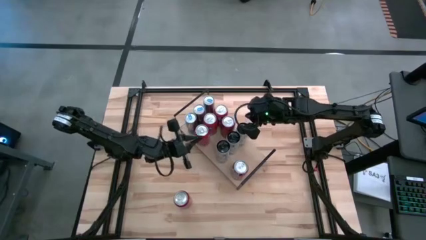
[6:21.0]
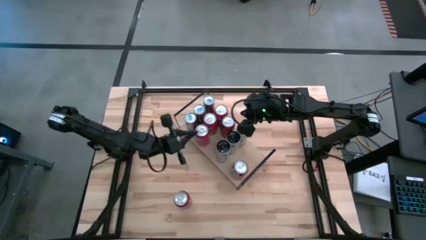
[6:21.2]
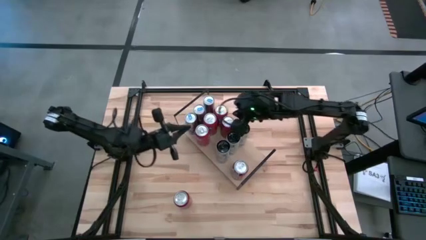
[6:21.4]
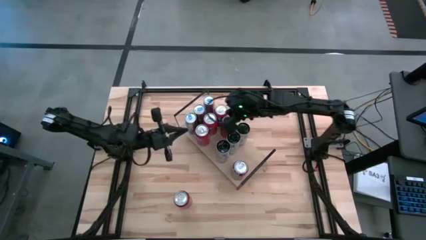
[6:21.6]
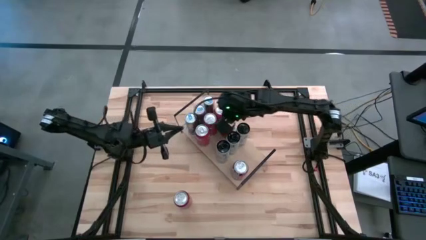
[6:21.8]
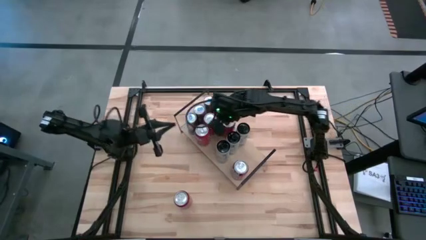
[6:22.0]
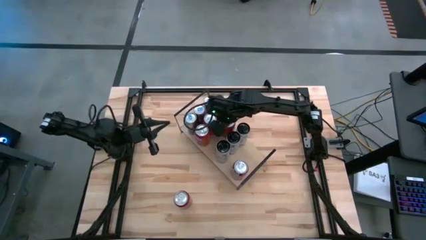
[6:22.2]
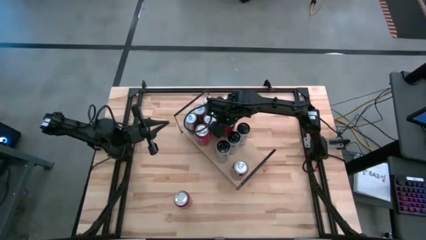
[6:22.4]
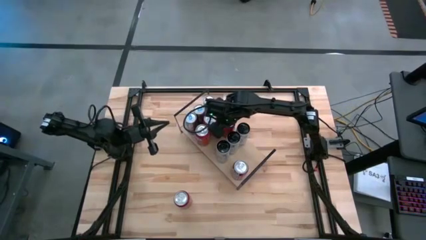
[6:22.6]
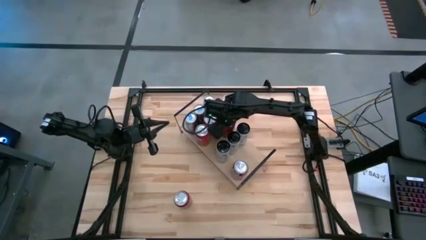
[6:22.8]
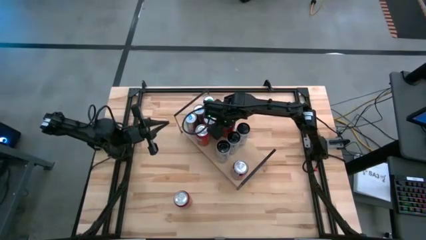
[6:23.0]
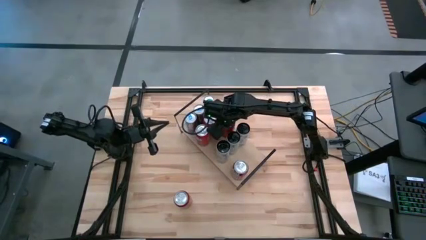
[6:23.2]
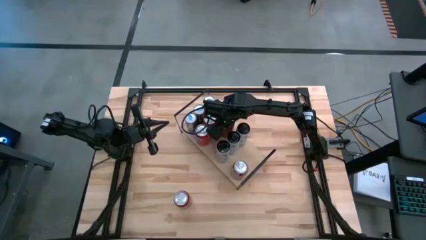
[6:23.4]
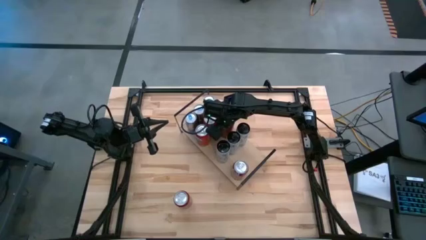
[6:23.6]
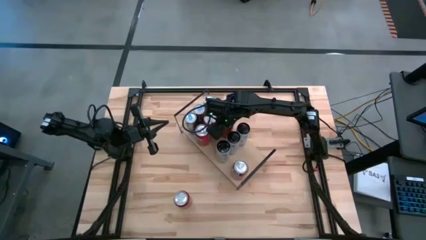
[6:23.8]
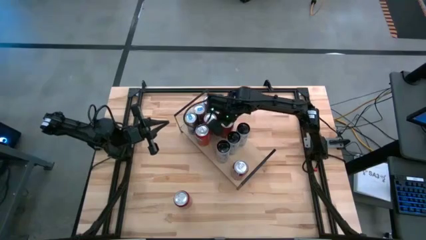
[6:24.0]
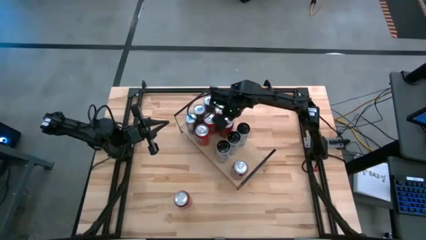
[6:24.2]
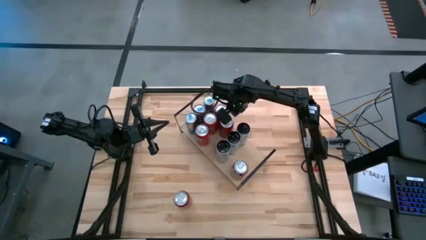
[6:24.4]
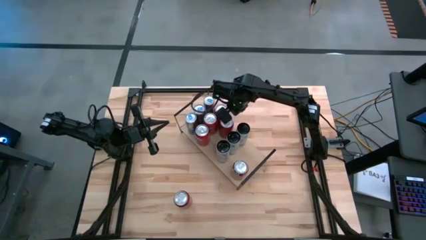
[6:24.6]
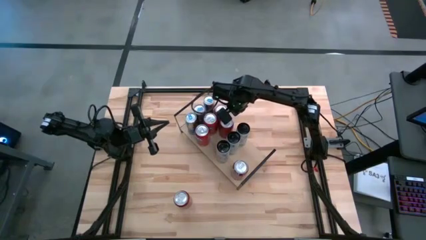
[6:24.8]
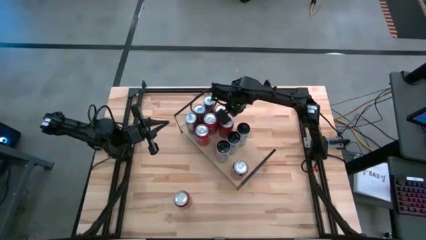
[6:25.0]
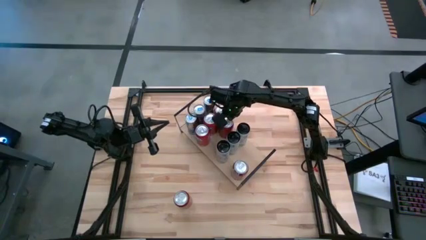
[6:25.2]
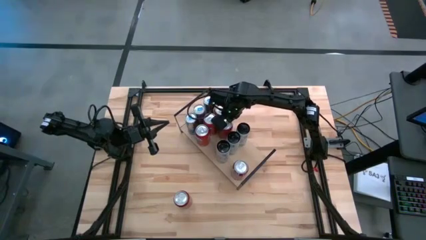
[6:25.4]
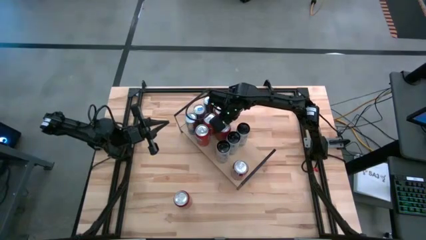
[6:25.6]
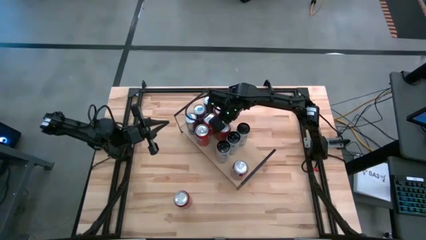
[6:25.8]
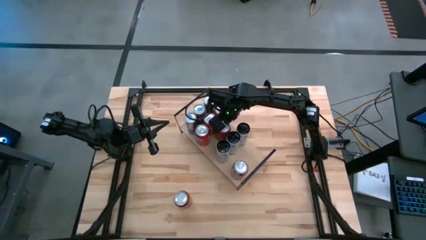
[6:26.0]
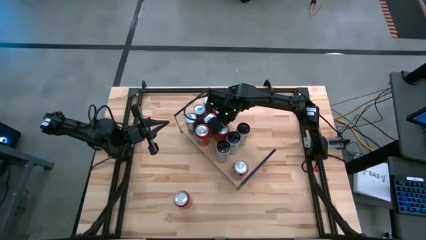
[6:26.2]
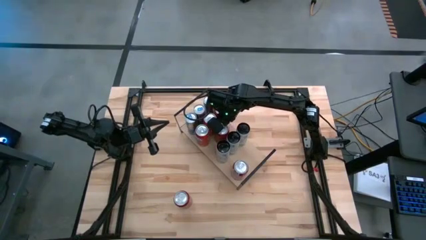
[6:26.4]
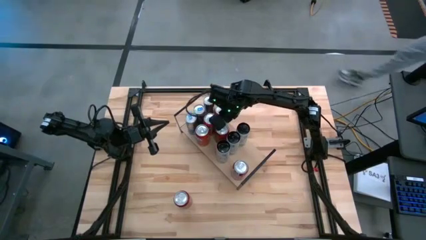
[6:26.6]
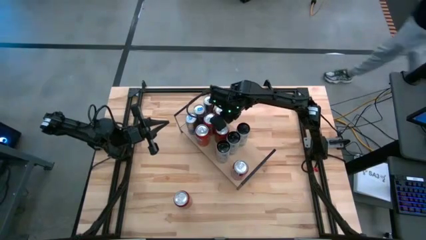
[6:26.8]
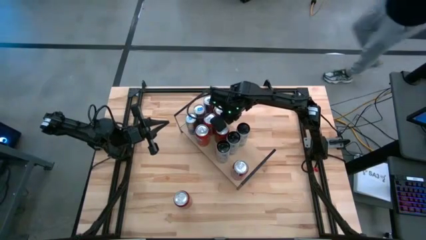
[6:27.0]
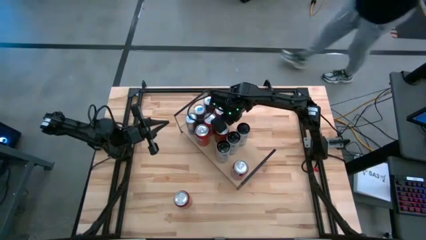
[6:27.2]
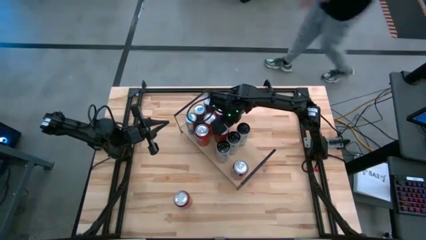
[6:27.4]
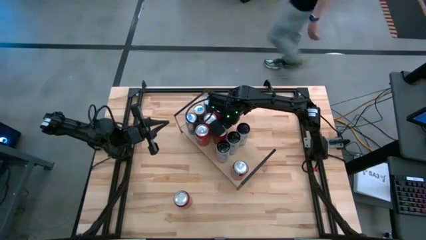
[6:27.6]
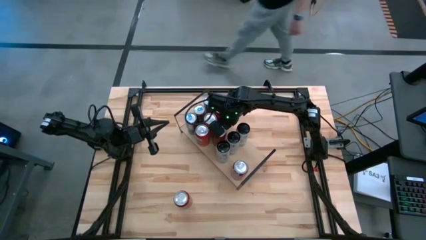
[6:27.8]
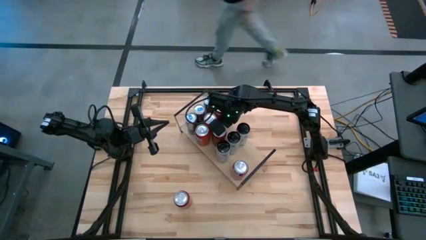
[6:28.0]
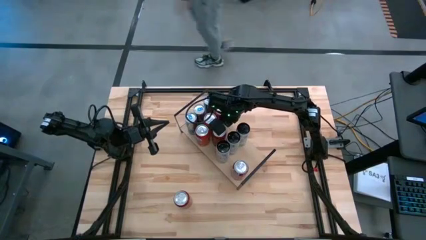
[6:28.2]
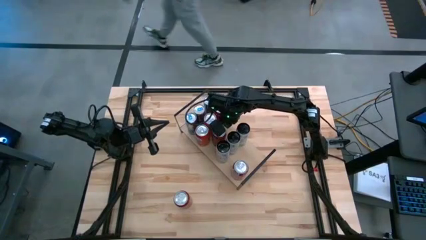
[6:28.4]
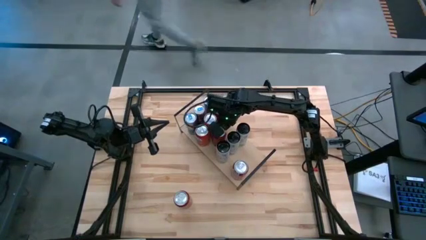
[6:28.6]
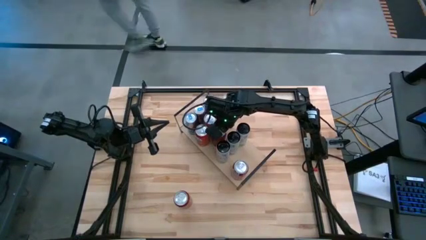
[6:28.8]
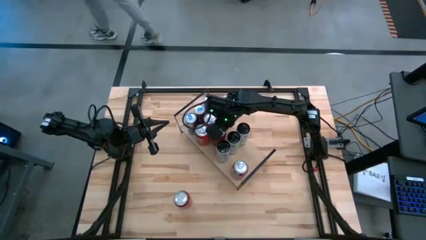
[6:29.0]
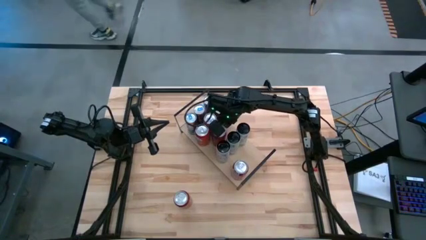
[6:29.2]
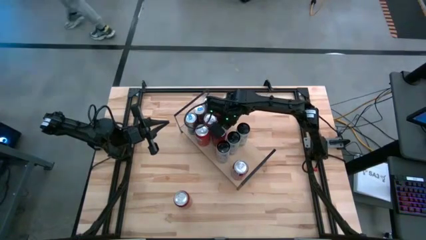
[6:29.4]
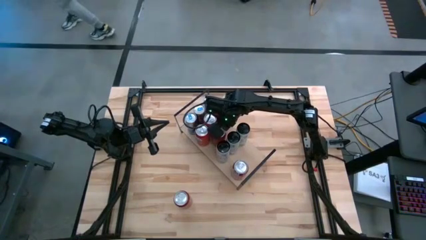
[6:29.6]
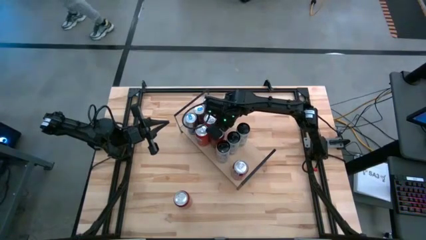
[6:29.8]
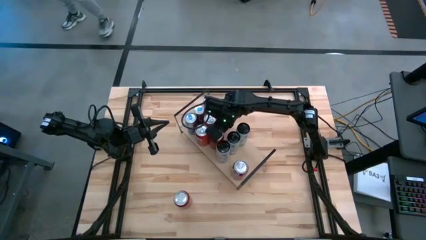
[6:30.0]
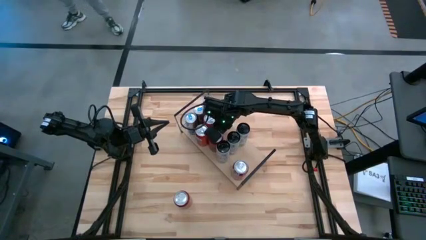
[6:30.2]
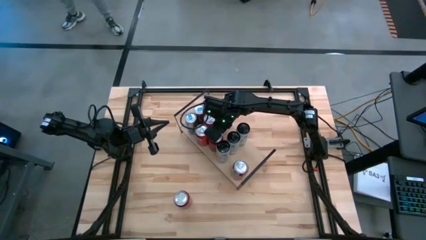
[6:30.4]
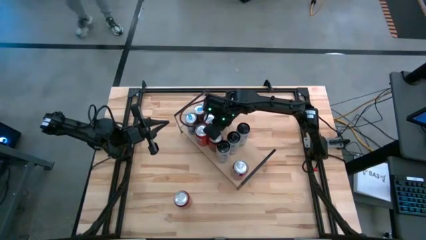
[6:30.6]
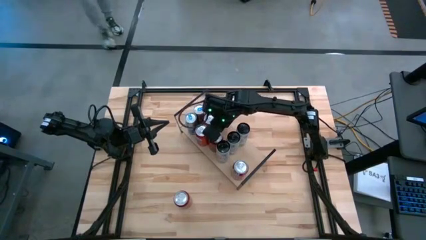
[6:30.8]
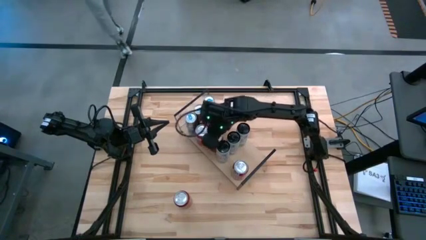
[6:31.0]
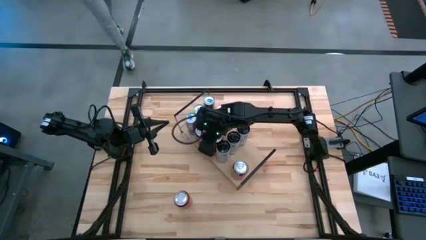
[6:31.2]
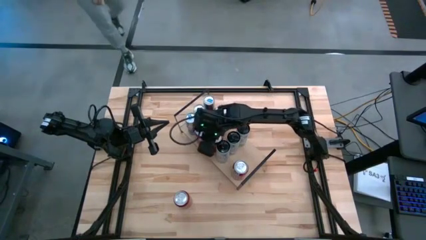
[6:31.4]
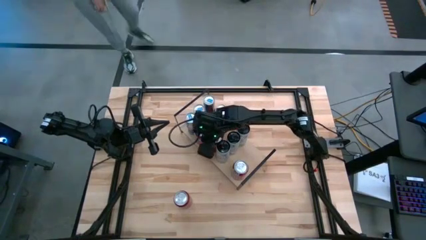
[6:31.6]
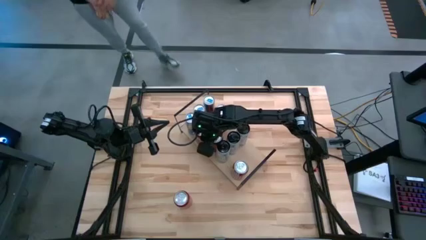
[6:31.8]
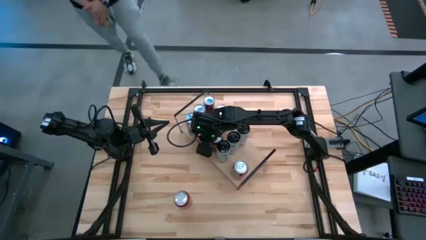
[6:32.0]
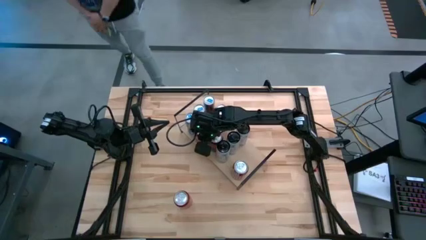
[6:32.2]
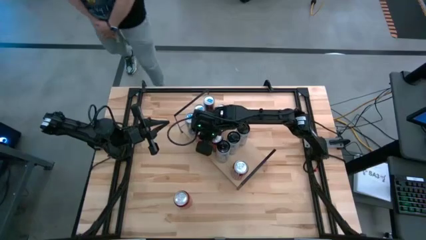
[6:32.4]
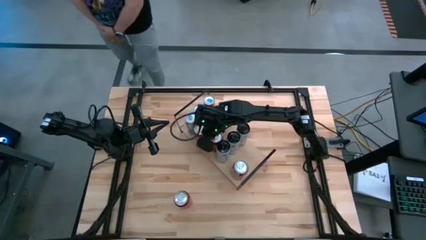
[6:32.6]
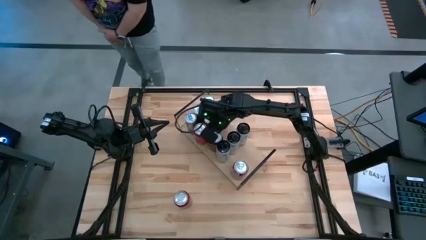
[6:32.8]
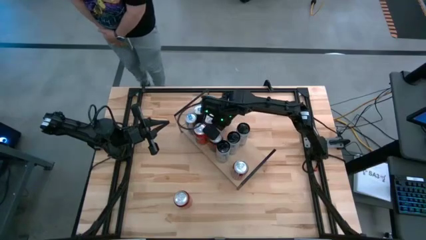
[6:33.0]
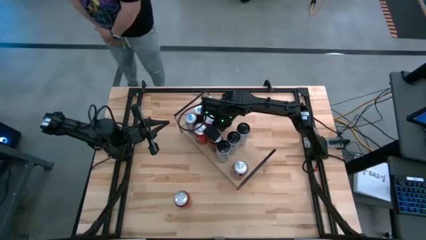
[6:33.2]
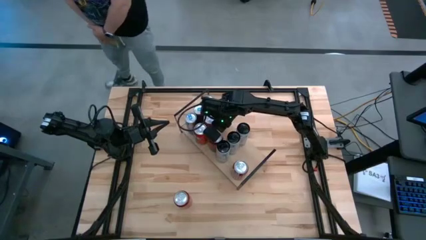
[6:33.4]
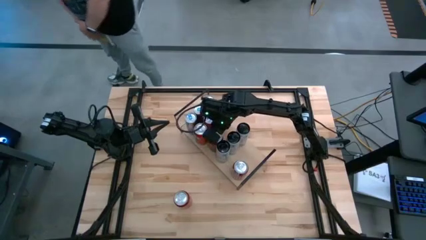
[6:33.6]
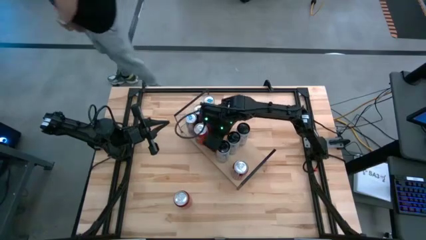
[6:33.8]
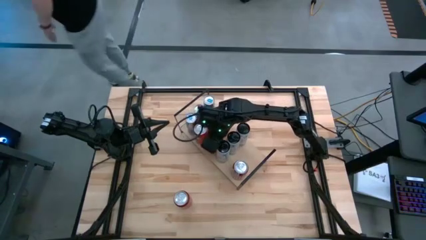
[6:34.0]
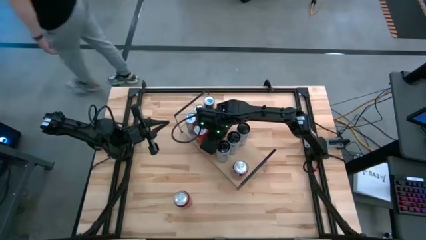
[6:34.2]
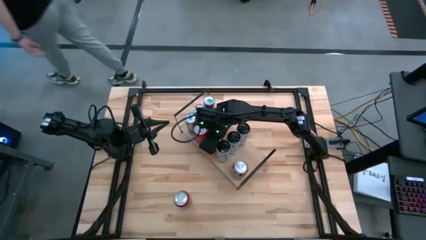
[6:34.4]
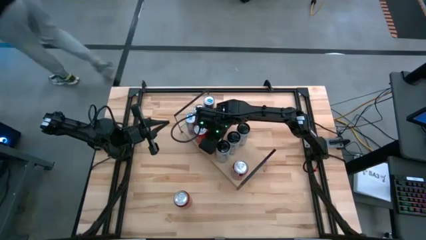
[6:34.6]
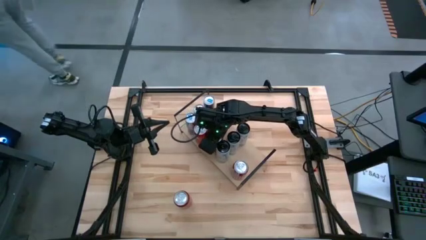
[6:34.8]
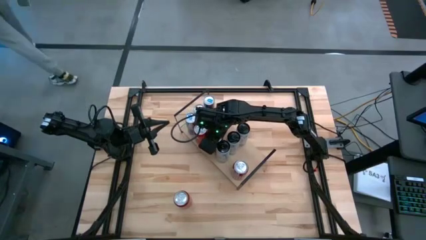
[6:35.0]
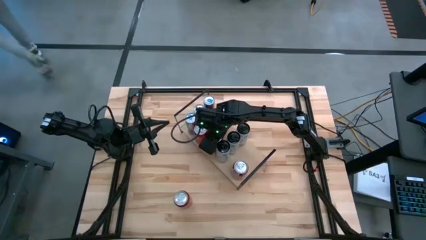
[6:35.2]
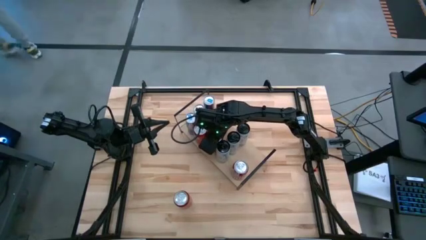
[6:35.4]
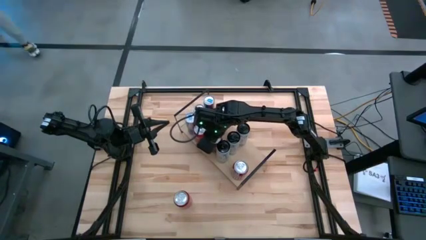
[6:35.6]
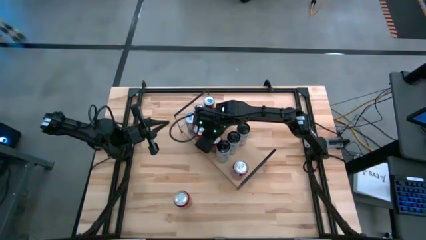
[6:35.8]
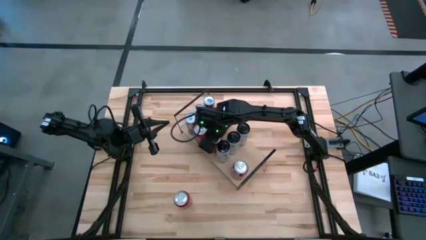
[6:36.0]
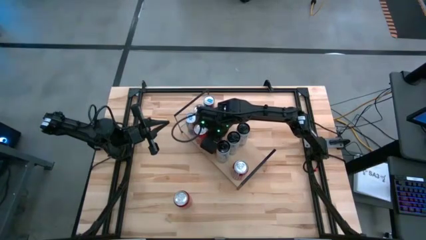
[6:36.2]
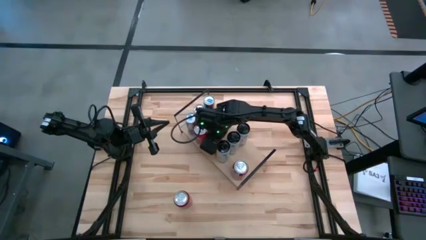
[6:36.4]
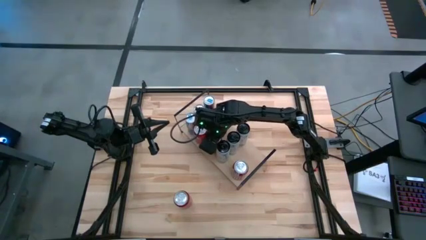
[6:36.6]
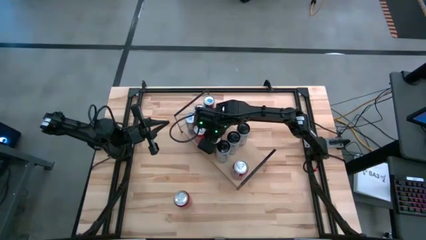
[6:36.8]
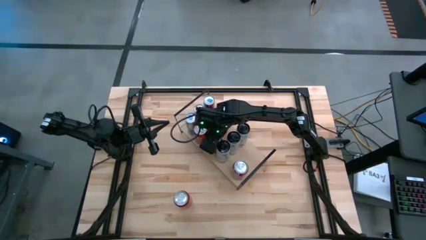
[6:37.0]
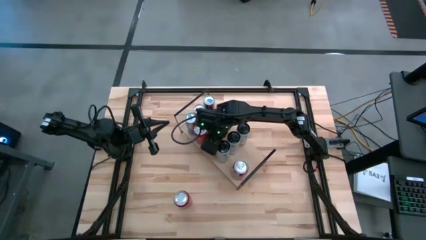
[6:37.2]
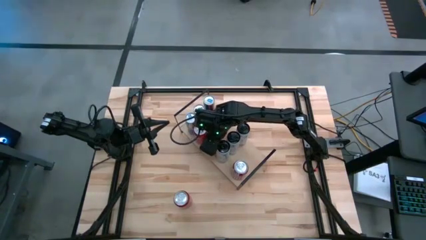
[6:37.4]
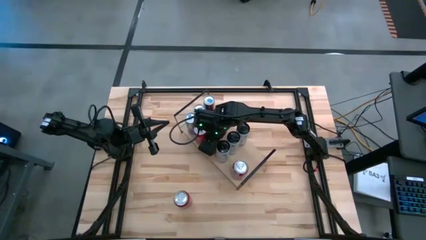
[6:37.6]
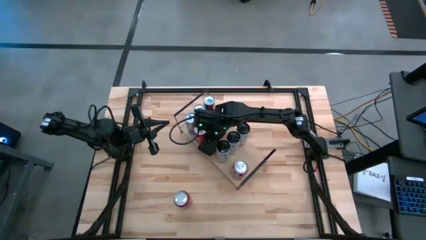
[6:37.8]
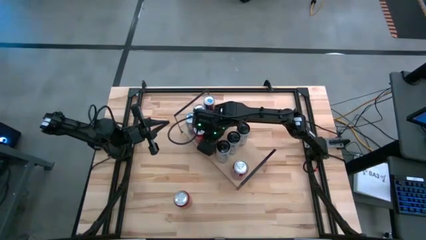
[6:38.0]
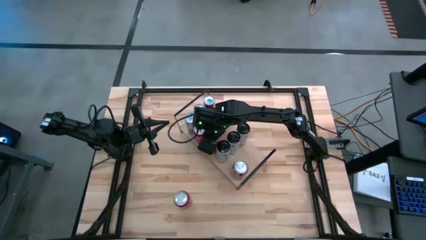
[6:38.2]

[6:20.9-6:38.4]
Task: Place canned beverage on shelf
Adjust the red soda can
